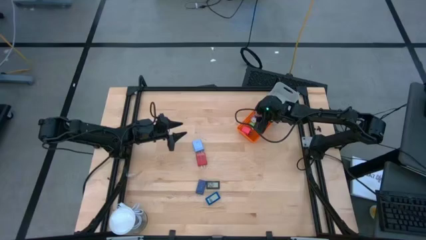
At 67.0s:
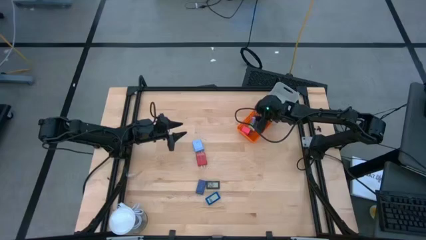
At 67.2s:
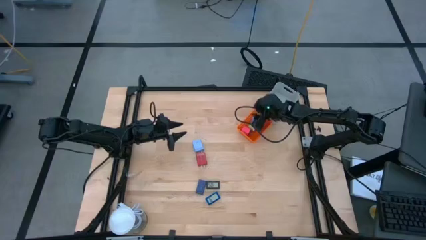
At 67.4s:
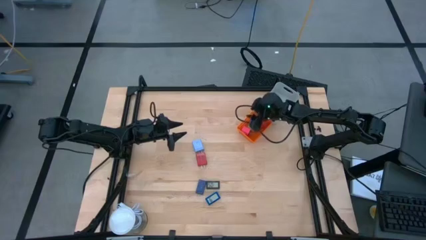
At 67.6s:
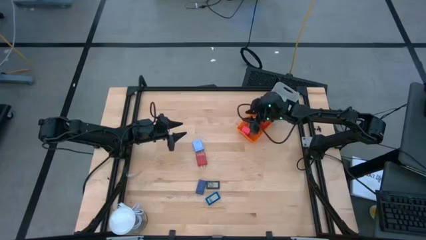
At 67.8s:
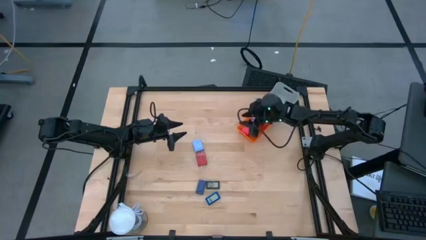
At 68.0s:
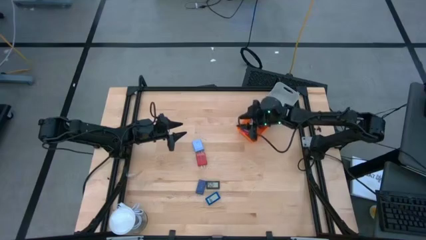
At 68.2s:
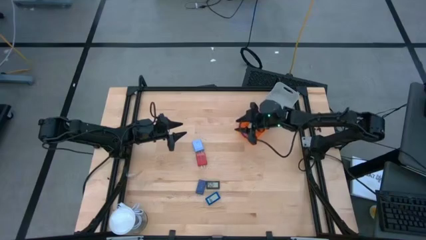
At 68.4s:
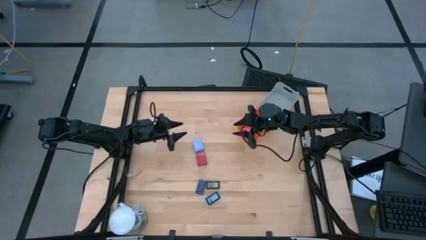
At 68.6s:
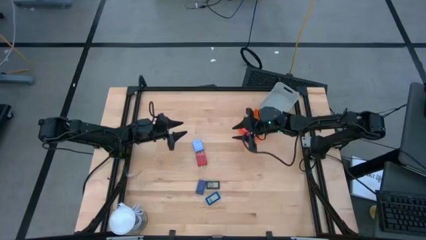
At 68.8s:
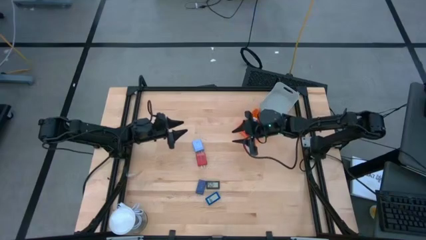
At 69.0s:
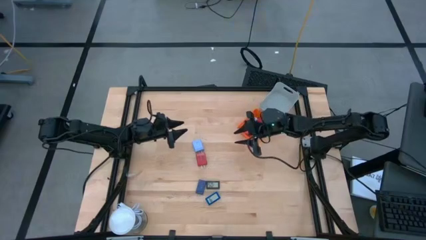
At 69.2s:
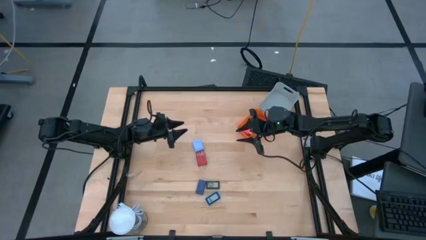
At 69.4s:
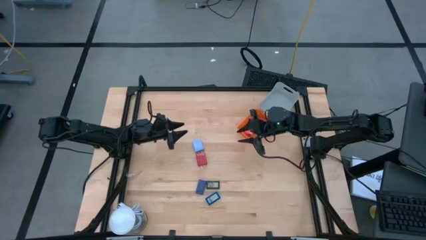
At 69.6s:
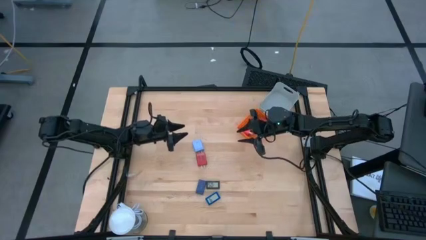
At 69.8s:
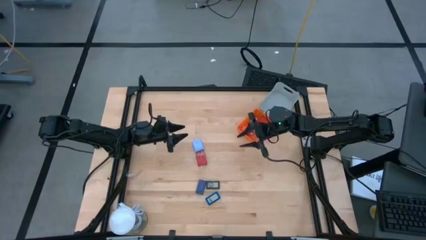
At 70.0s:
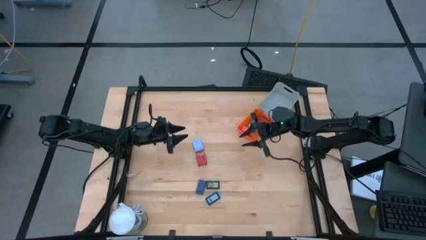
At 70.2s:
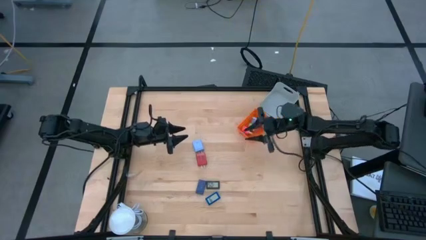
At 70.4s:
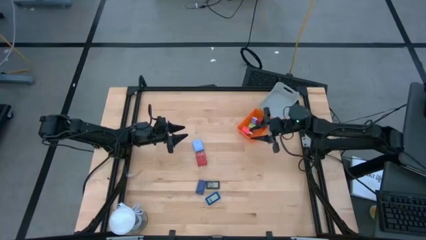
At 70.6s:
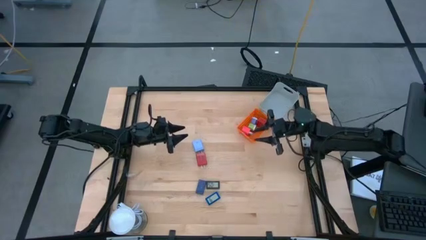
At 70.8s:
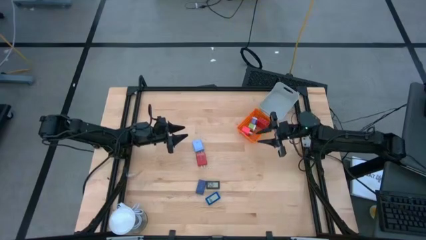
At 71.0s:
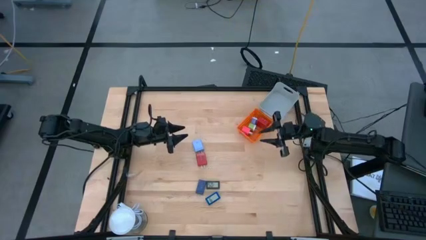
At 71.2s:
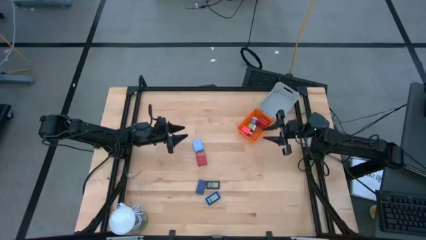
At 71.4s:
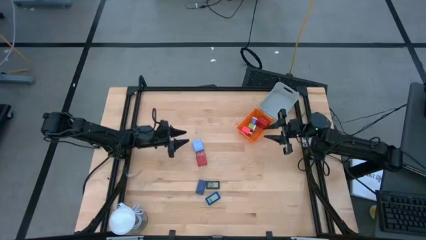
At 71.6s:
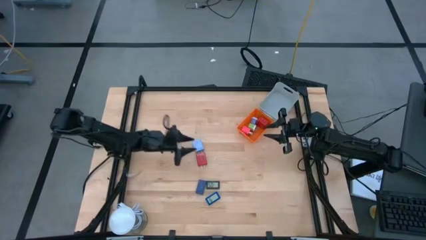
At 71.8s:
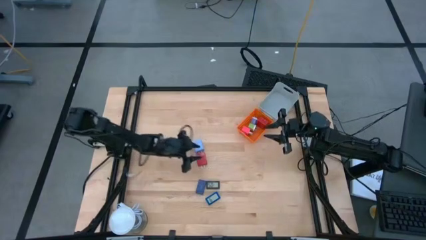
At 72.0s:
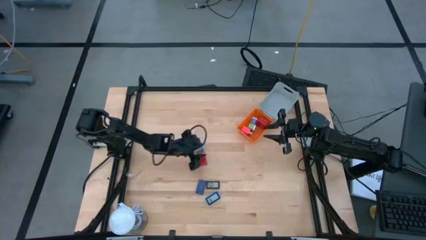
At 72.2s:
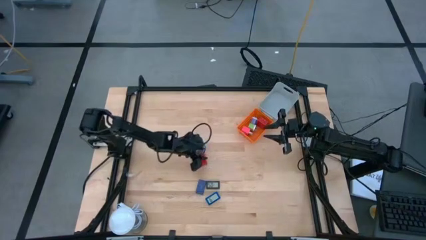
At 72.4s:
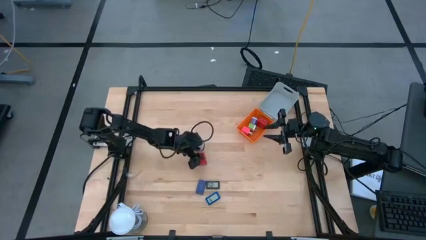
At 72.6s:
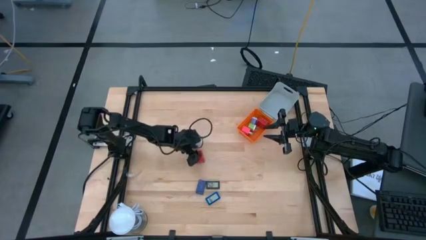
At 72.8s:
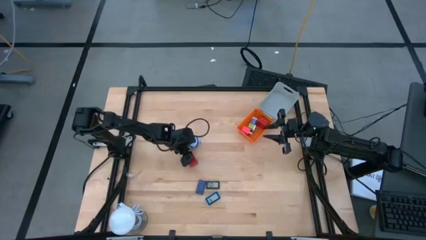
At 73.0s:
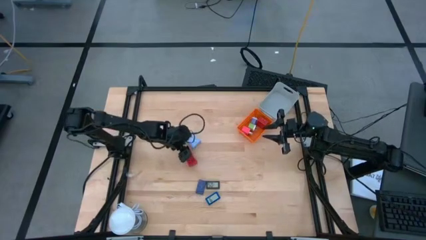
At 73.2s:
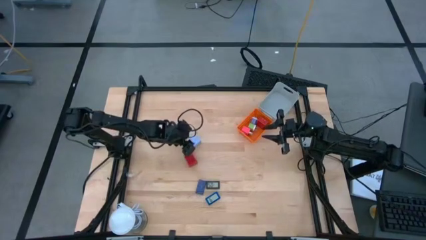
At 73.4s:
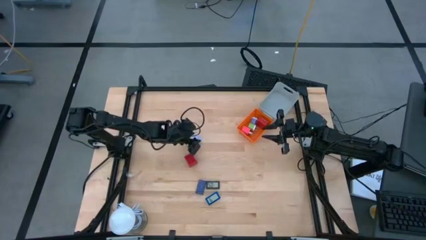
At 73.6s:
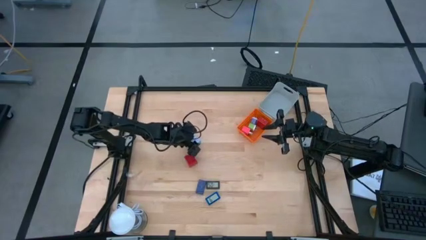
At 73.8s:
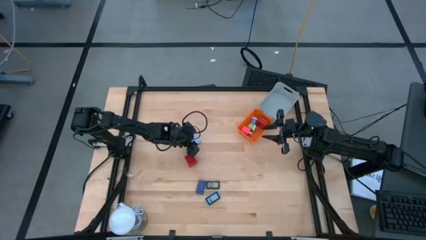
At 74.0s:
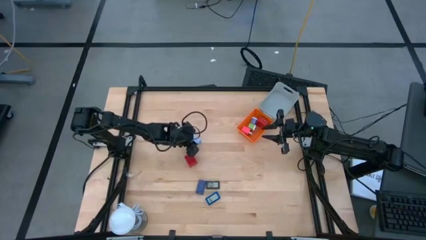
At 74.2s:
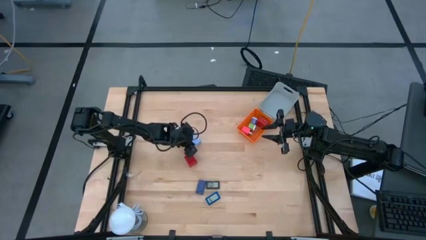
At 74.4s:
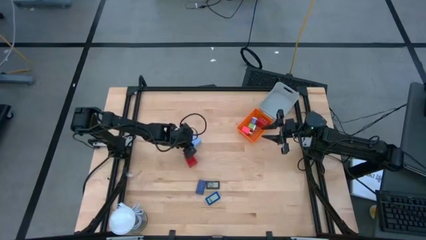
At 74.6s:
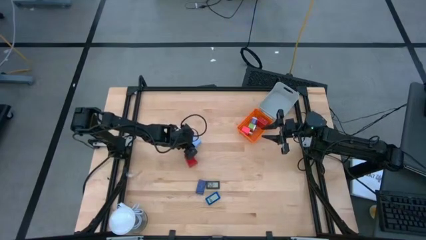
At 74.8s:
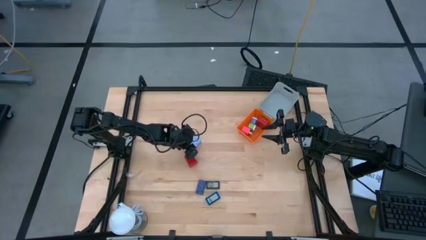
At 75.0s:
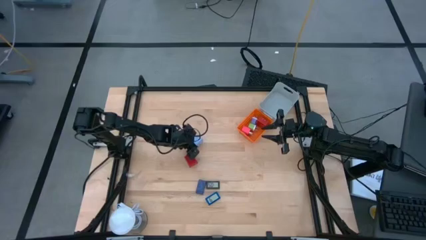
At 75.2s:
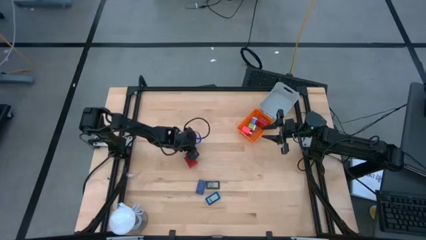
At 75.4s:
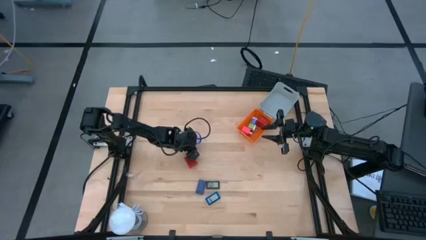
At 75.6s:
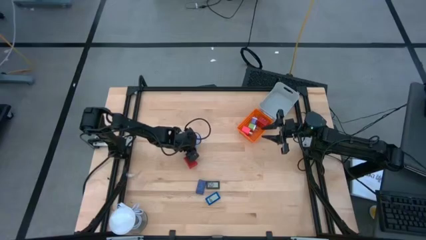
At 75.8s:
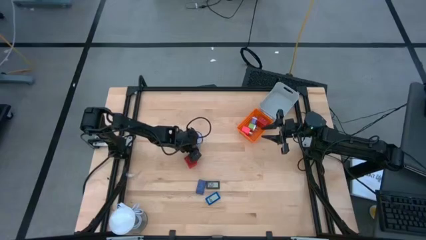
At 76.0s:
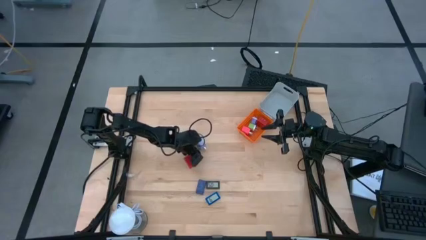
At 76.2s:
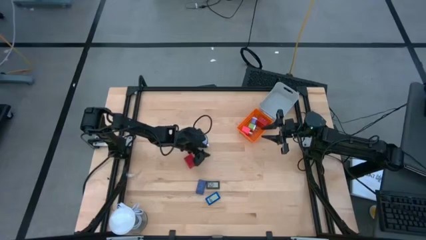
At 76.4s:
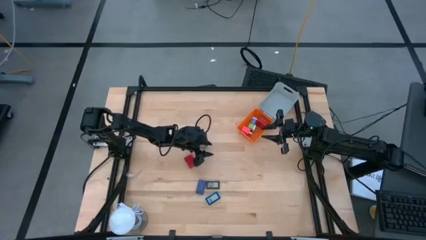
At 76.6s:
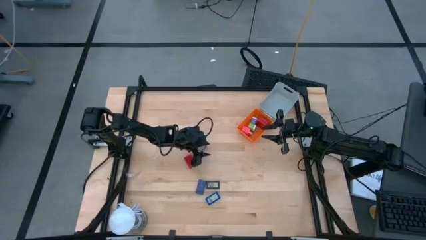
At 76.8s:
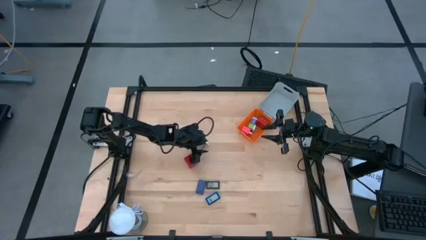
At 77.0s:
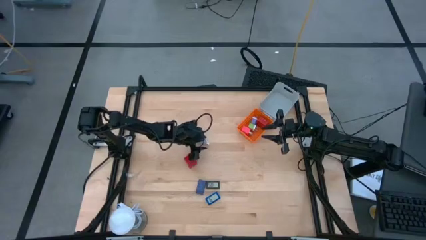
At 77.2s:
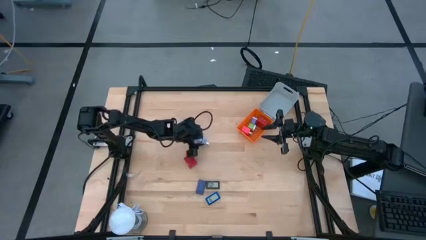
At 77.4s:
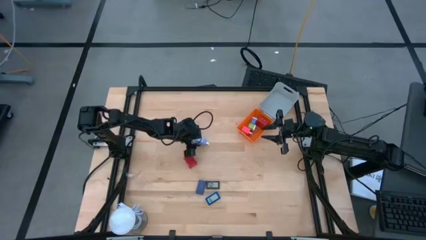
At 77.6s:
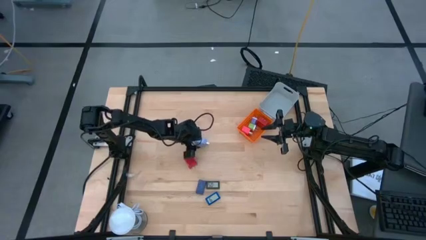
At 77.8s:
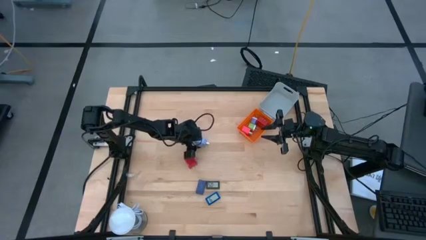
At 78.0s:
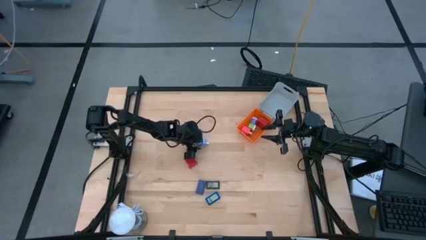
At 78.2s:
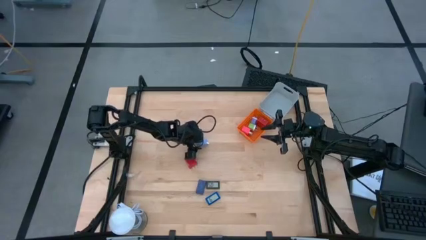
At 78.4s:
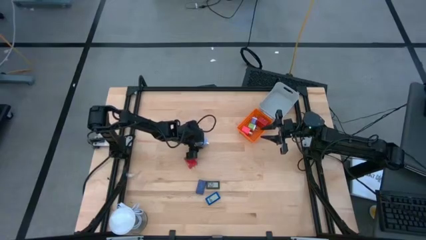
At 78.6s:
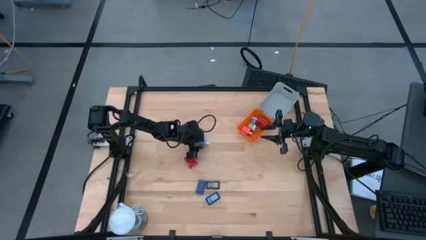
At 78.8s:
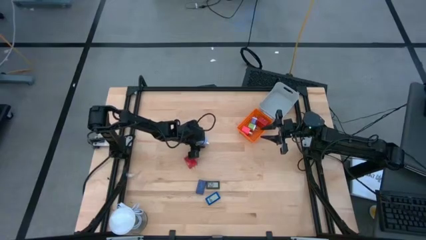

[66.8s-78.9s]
Task: Pick & Place Office items
Put the blue charger adapter into the orange bin

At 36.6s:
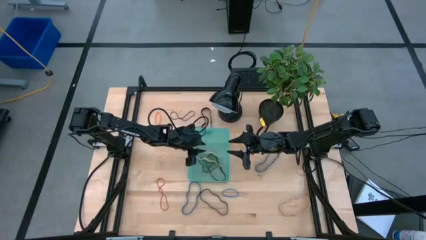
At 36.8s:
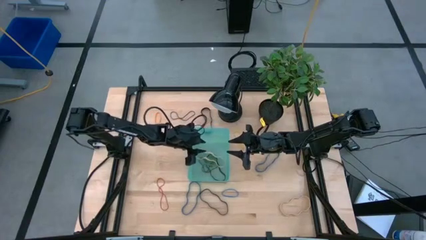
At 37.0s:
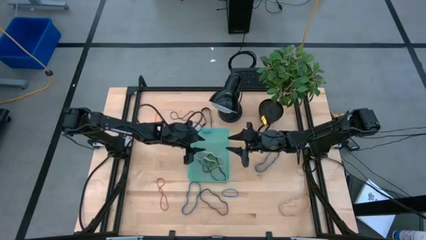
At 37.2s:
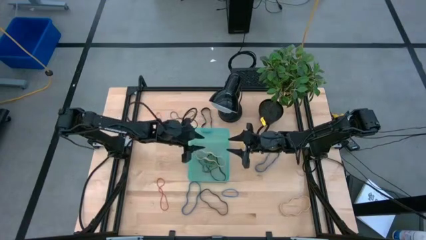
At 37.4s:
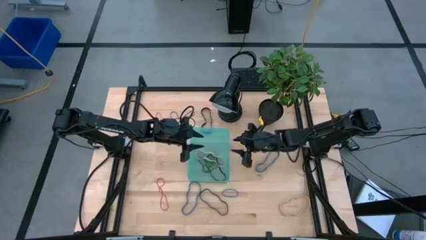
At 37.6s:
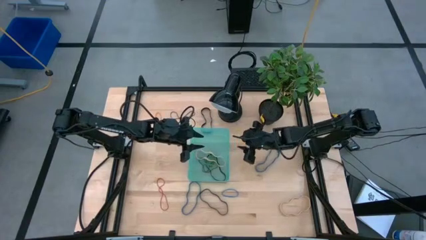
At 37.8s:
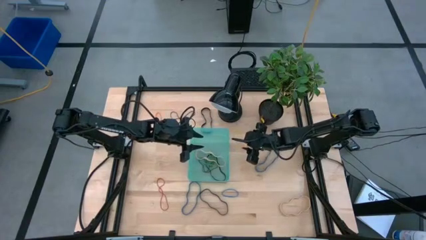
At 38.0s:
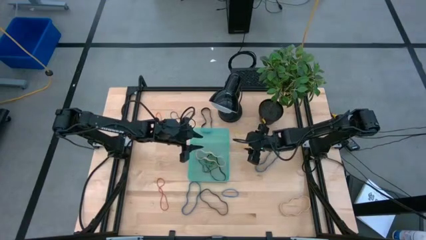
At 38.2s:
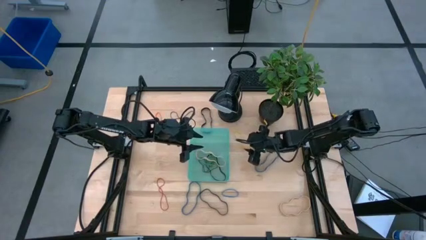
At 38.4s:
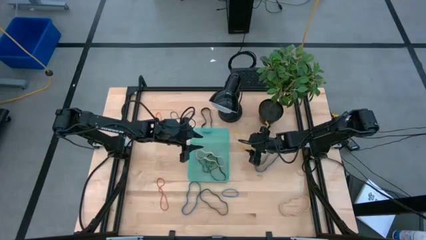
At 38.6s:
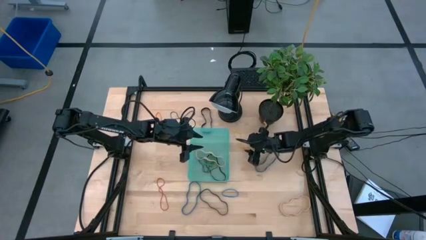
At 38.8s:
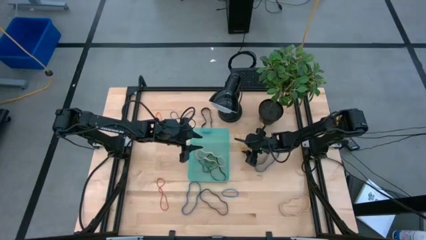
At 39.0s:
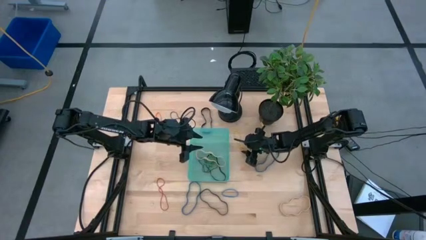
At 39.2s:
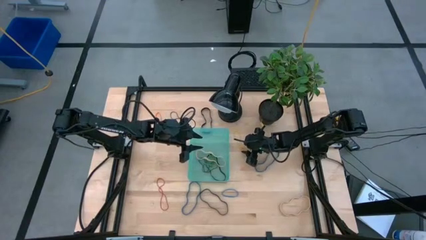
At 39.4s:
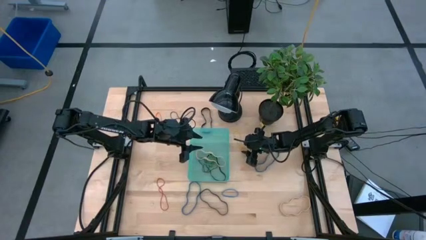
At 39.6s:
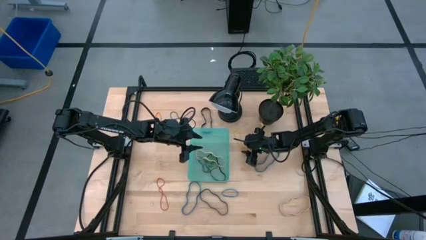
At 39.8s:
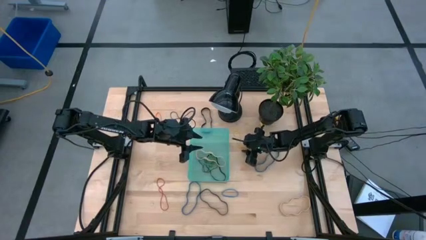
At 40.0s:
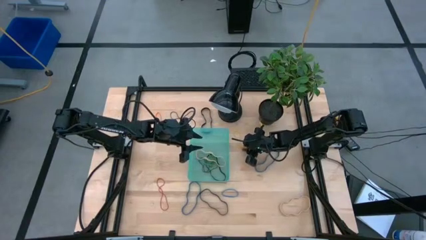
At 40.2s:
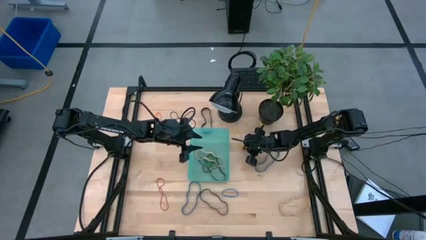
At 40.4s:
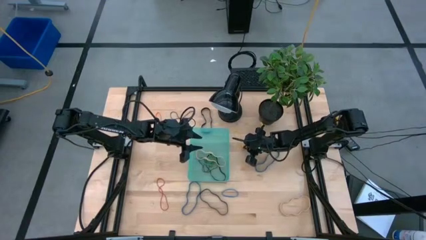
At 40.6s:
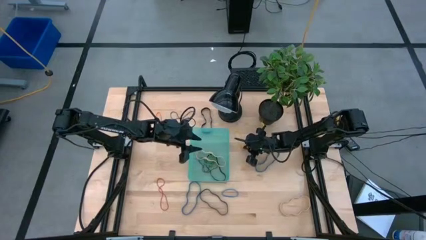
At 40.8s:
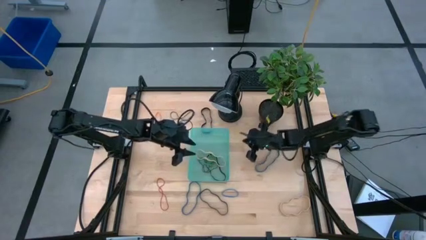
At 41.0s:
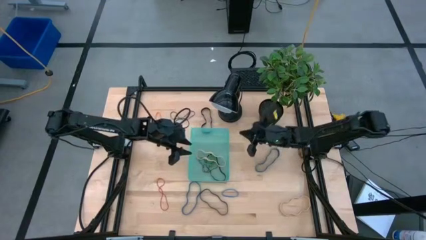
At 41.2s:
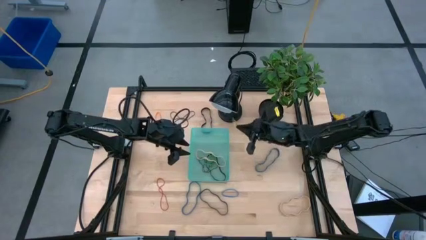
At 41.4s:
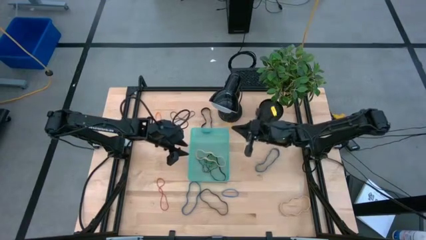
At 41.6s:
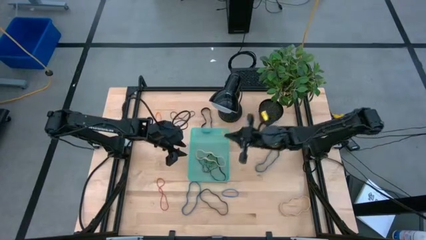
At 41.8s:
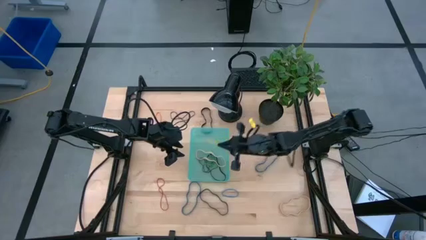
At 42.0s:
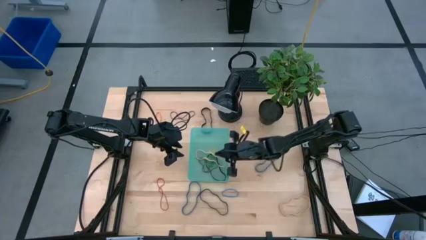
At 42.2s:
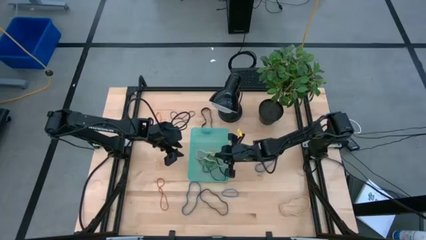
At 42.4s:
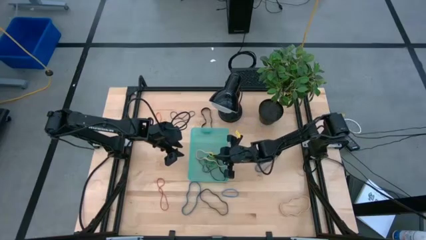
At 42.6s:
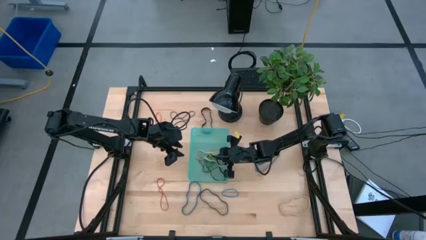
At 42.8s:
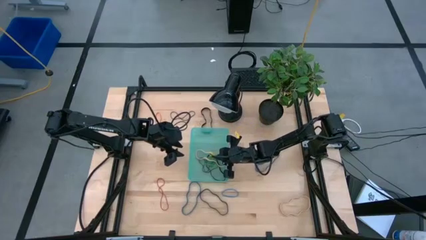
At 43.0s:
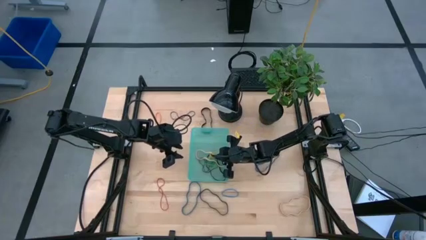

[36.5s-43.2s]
Task: Pick and place rubber bands into bin
Put the yellow rubber band into the basket
